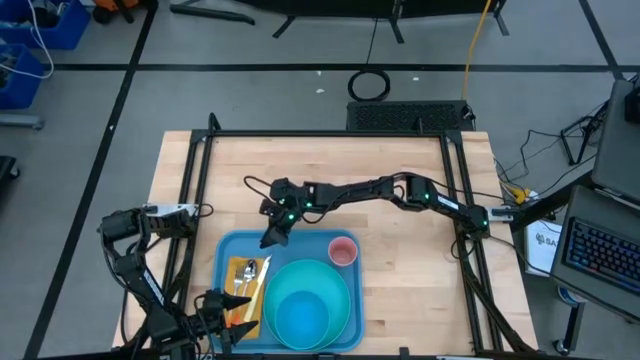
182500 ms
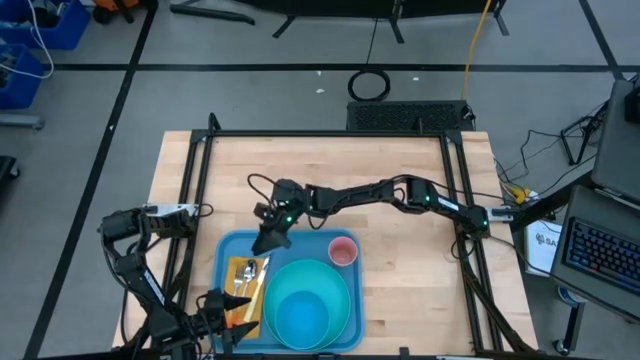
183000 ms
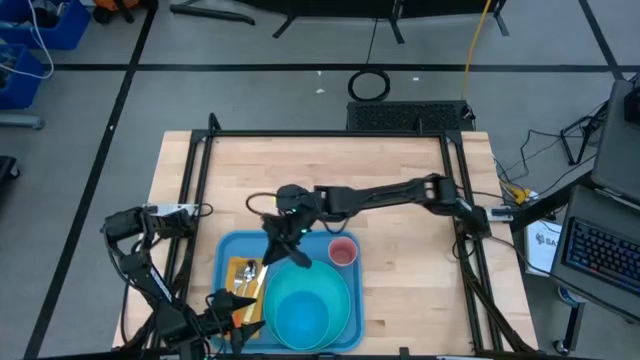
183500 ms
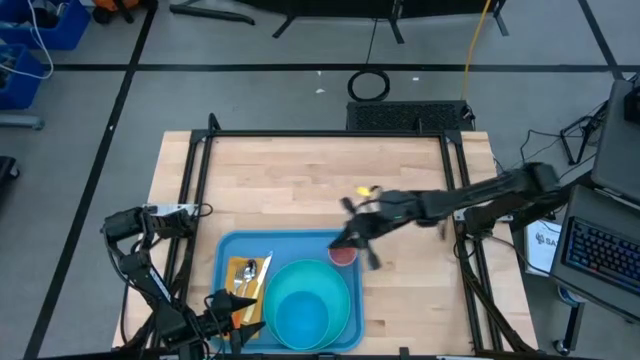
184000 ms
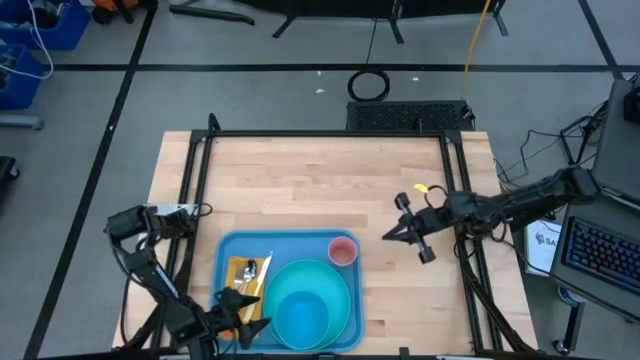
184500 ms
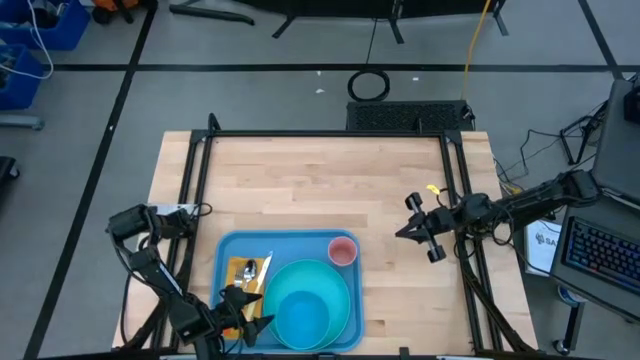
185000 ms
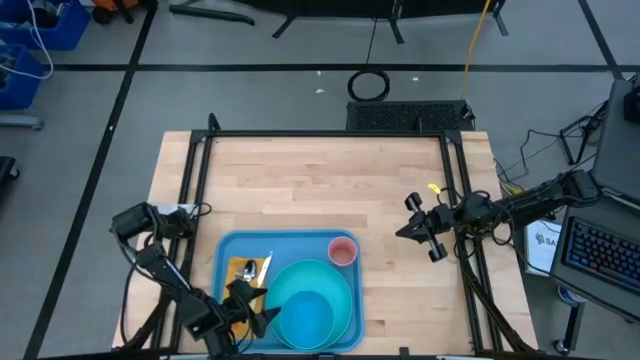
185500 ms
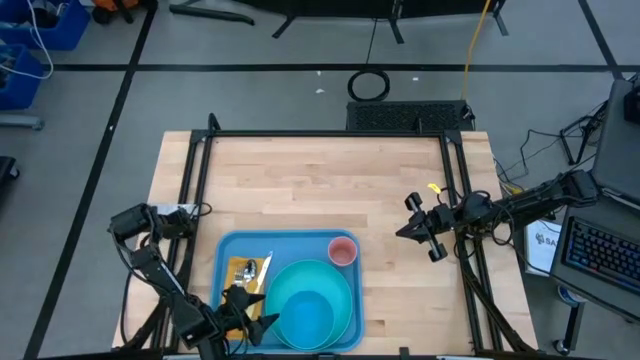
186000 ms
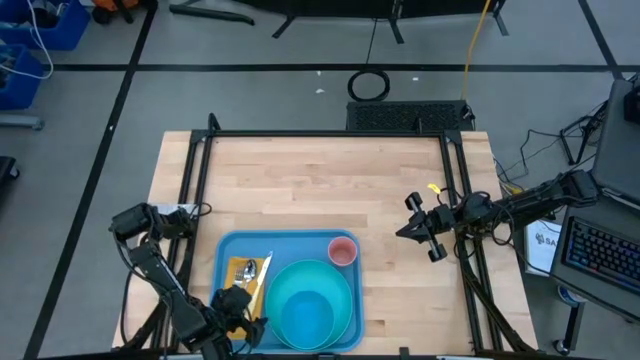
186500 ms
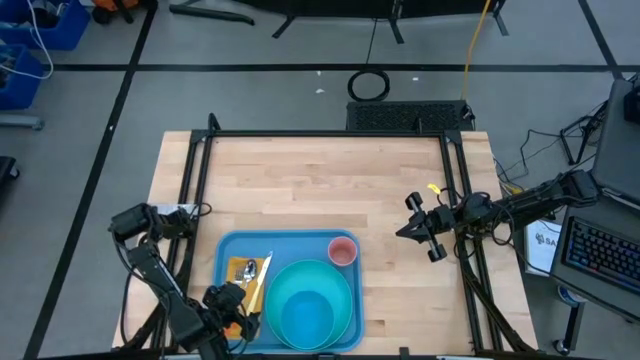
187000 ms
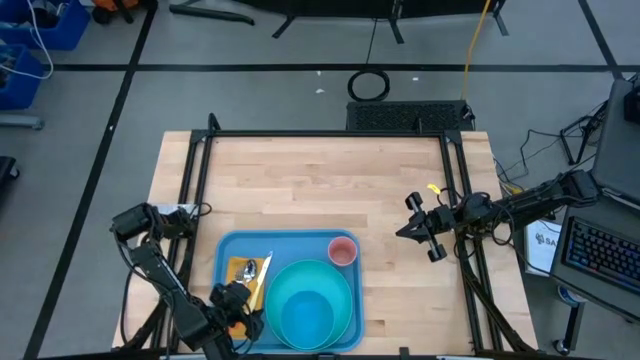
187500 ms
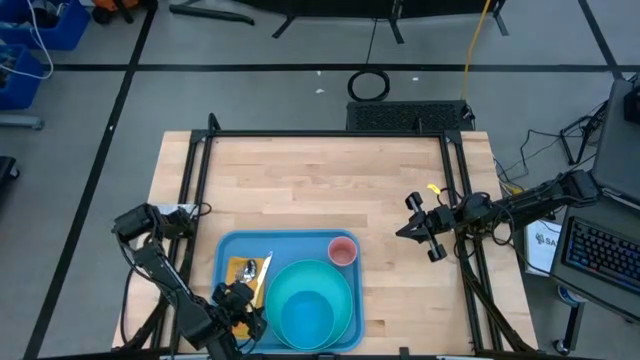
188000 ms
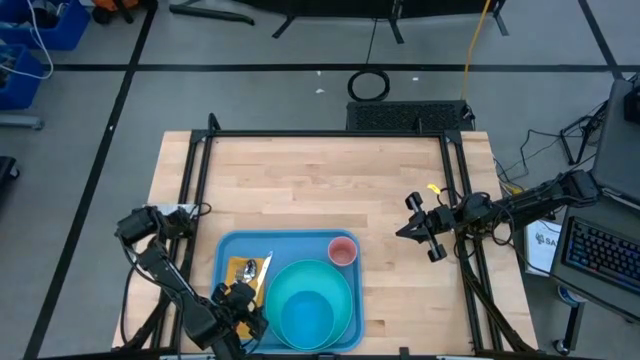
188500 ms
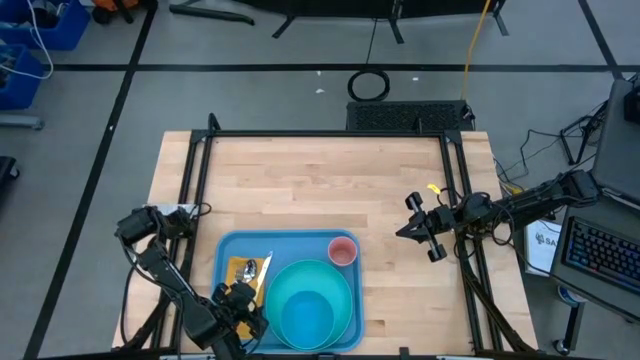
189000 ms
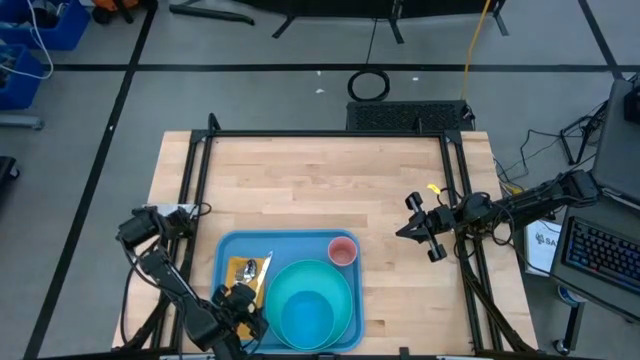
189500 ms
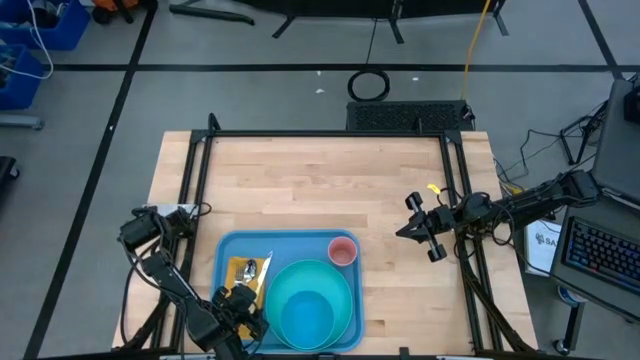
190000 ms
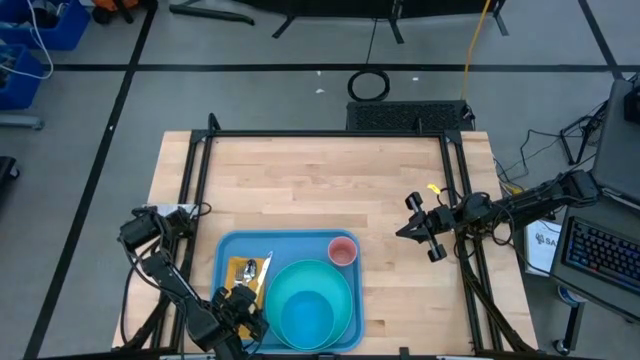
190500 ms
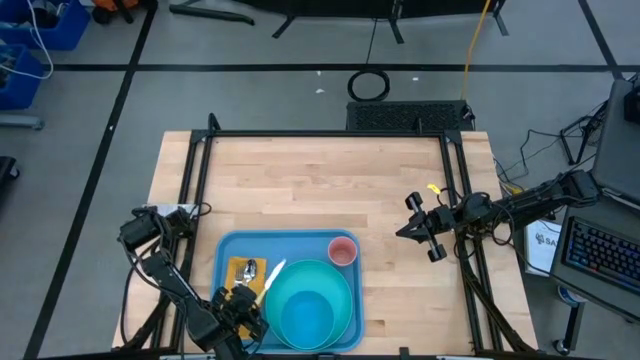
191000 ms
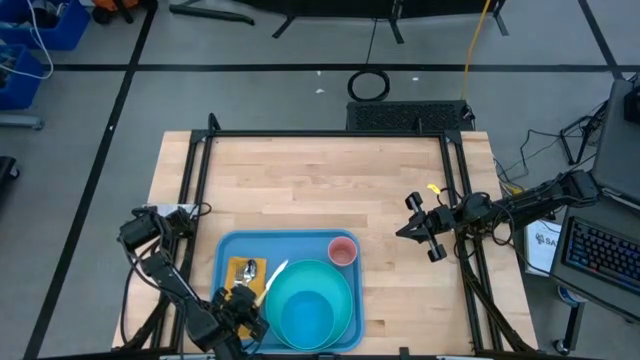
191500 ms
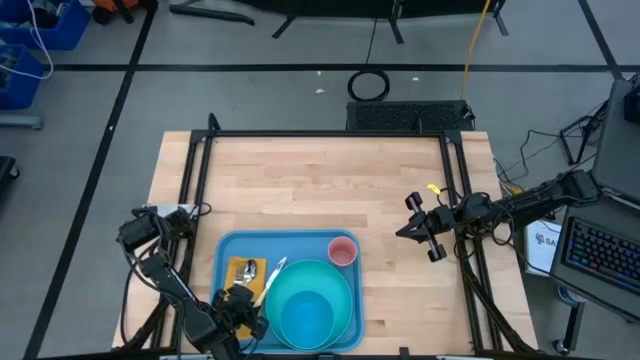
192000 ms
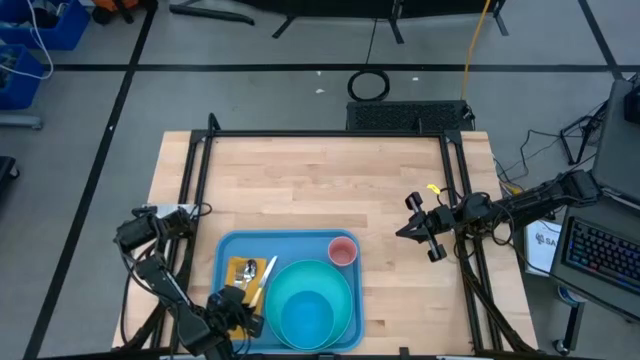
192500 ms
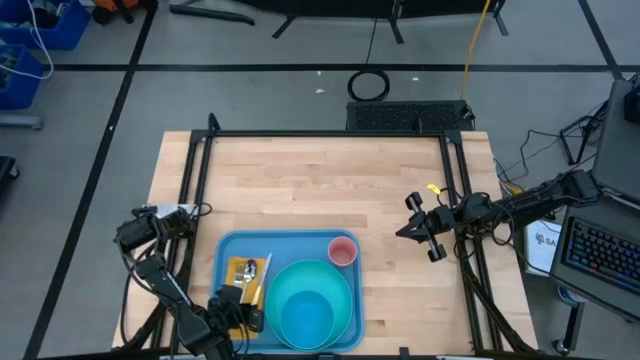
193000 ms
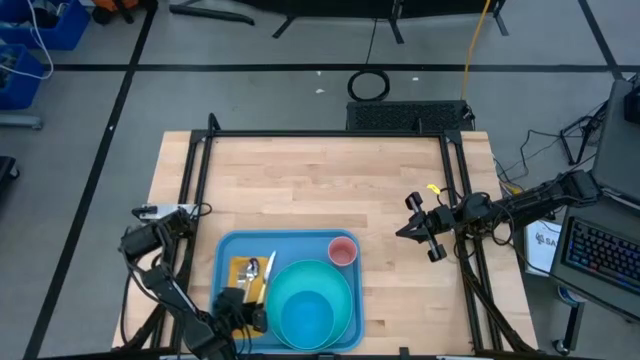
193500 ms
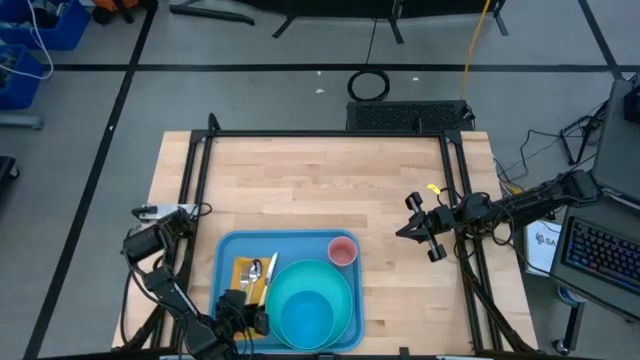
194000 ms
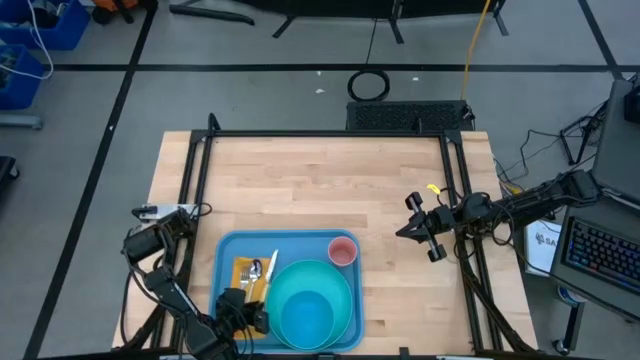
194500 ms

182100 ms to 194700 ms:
Task: Set up tray
Put the light yellow table knife to the right of the orange spoon on the yellow table napkin
